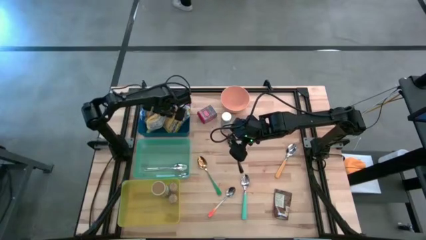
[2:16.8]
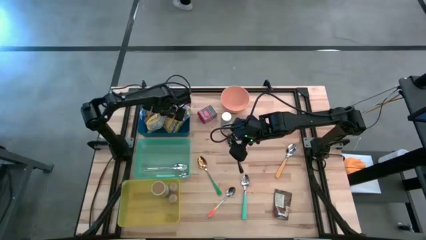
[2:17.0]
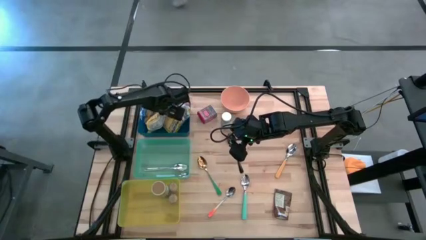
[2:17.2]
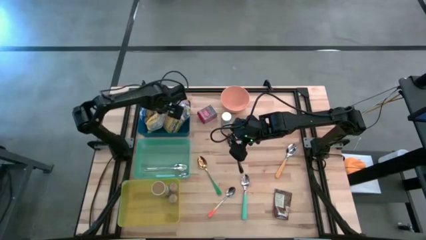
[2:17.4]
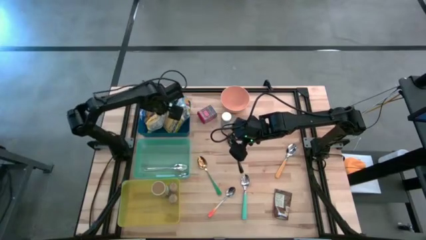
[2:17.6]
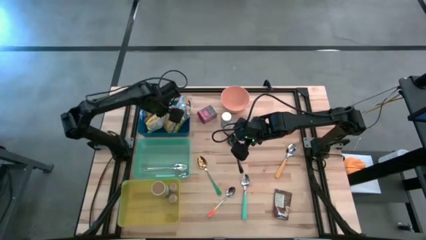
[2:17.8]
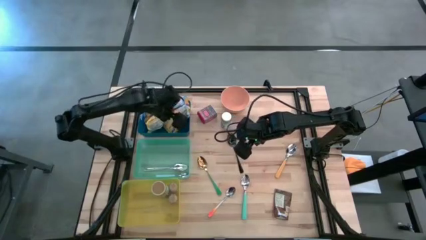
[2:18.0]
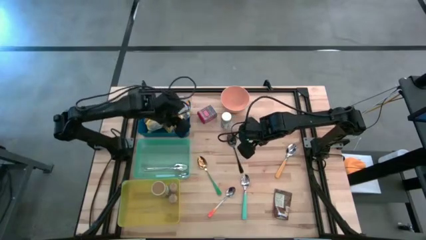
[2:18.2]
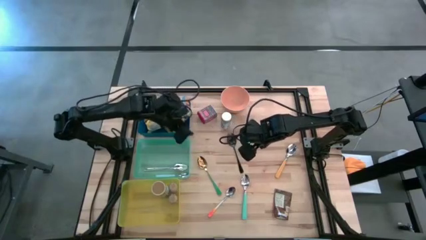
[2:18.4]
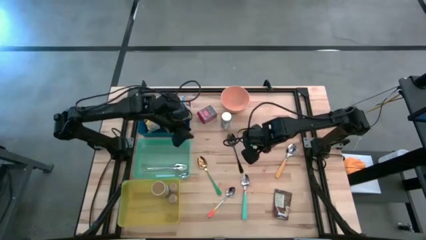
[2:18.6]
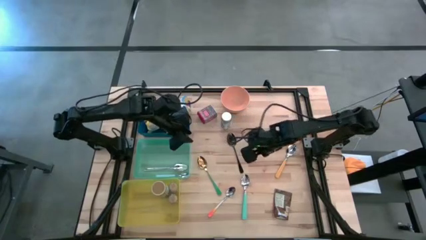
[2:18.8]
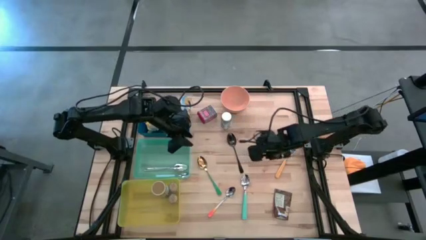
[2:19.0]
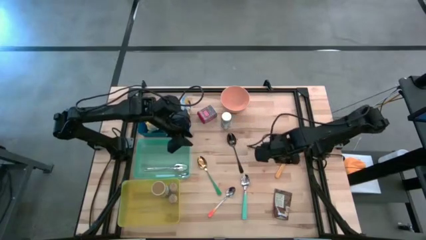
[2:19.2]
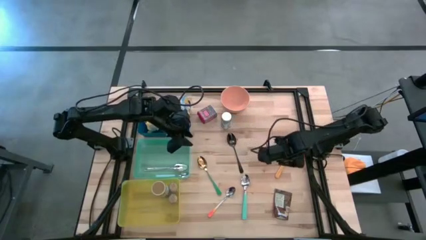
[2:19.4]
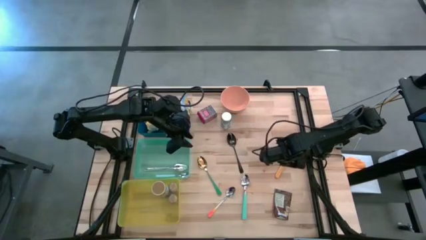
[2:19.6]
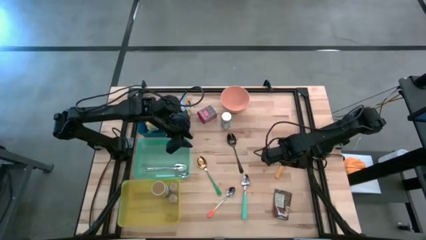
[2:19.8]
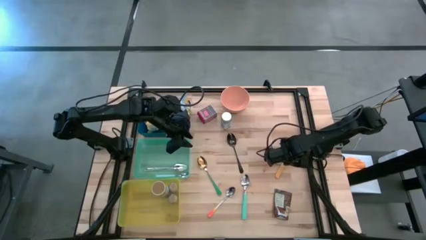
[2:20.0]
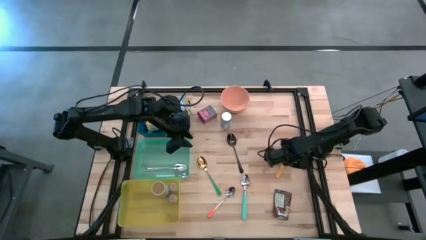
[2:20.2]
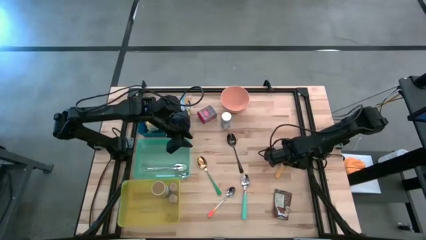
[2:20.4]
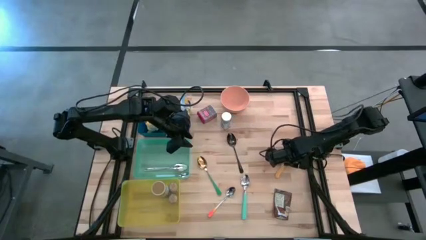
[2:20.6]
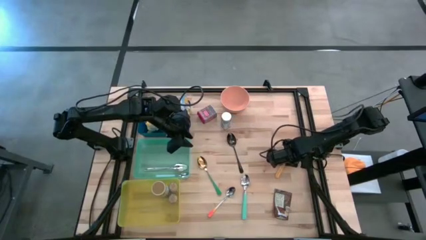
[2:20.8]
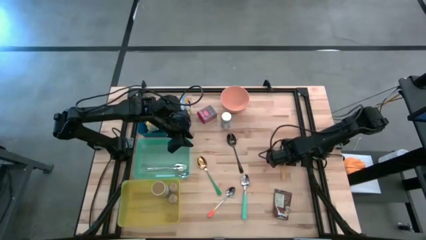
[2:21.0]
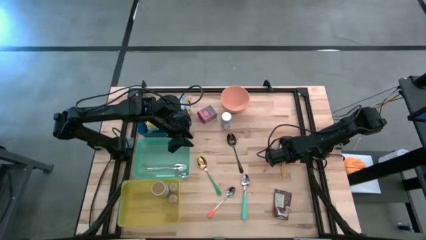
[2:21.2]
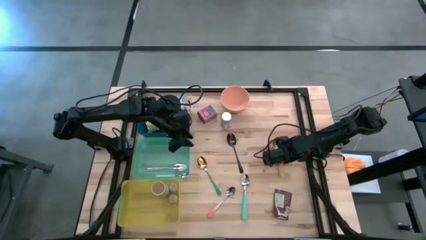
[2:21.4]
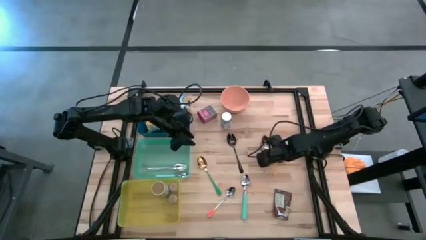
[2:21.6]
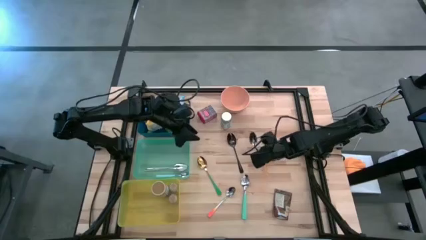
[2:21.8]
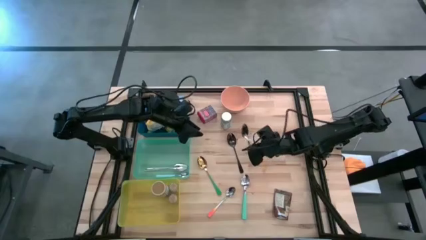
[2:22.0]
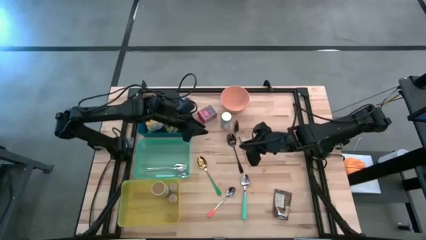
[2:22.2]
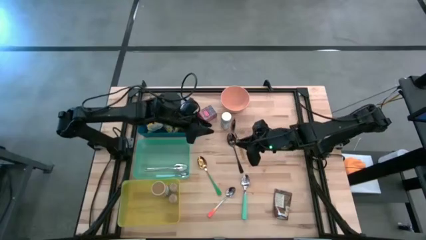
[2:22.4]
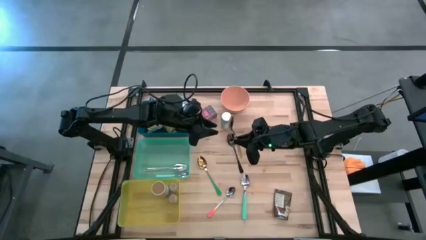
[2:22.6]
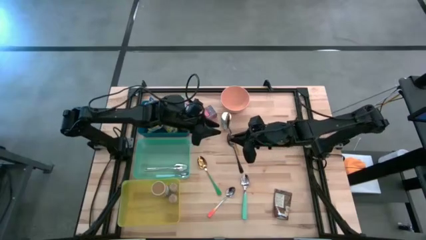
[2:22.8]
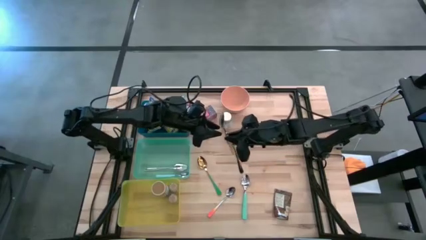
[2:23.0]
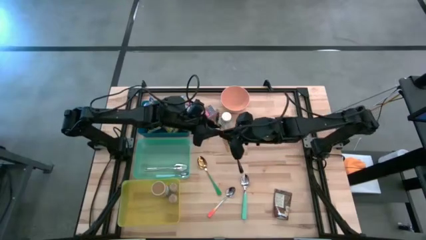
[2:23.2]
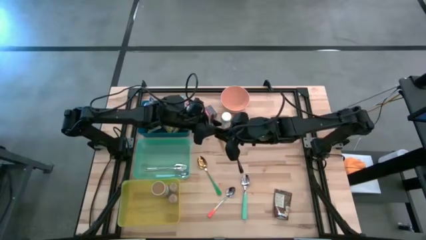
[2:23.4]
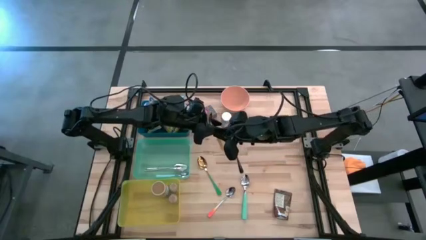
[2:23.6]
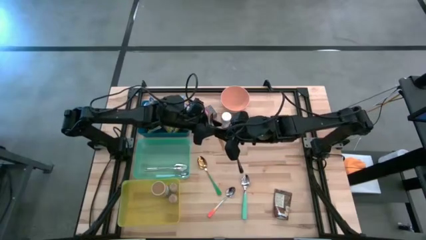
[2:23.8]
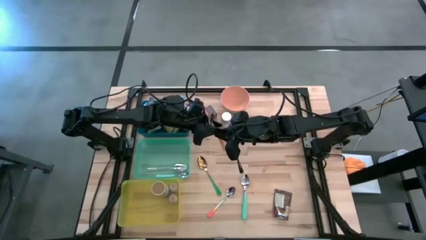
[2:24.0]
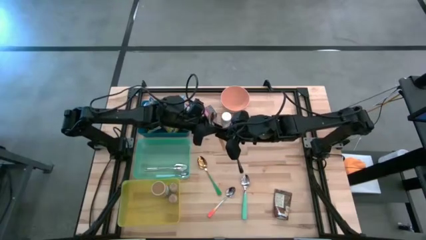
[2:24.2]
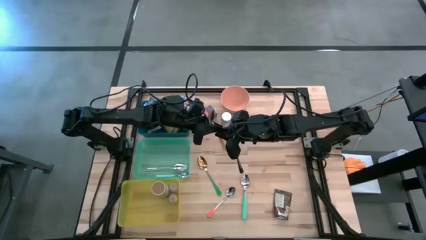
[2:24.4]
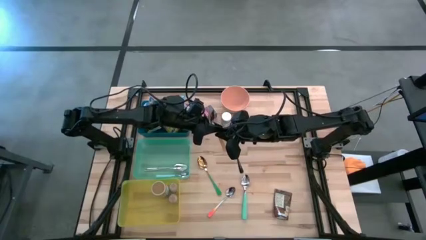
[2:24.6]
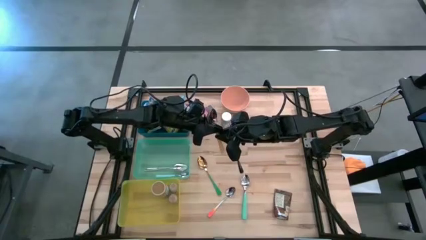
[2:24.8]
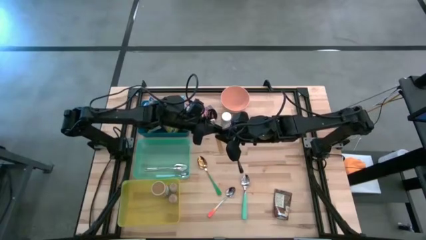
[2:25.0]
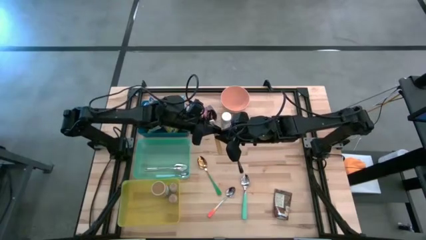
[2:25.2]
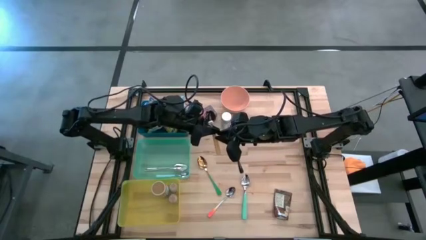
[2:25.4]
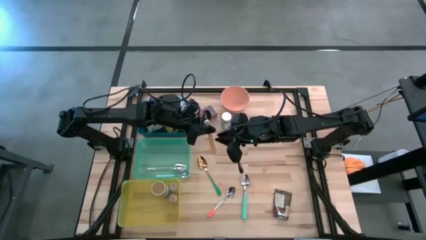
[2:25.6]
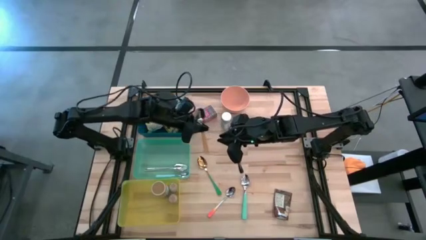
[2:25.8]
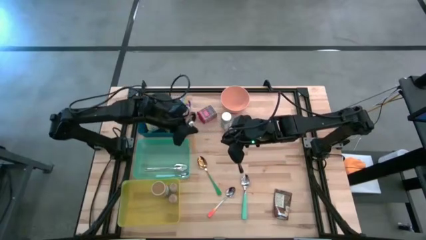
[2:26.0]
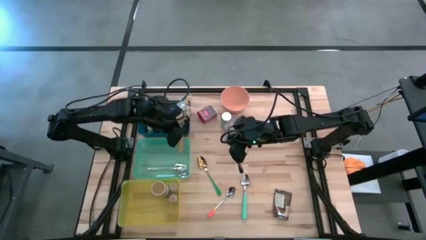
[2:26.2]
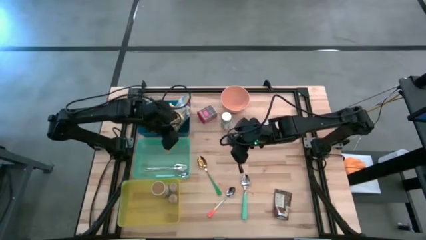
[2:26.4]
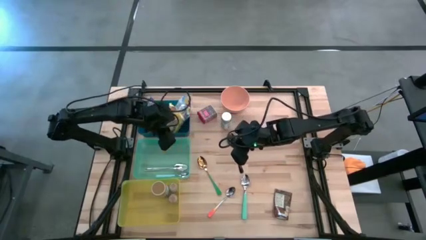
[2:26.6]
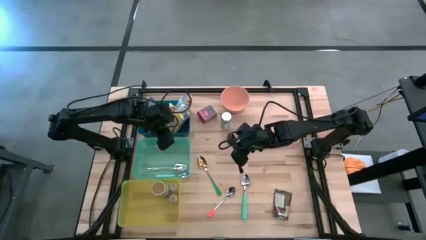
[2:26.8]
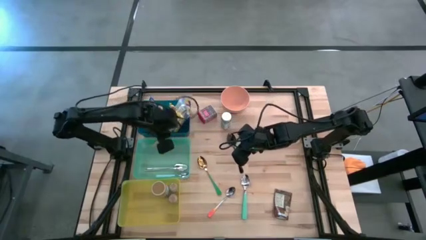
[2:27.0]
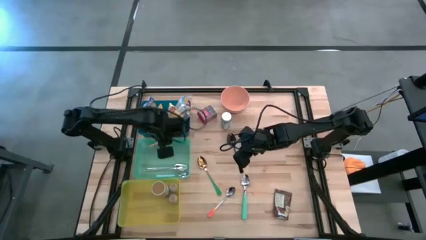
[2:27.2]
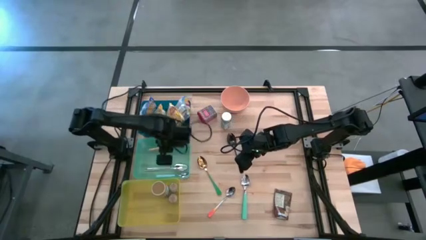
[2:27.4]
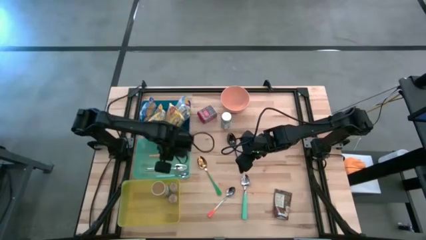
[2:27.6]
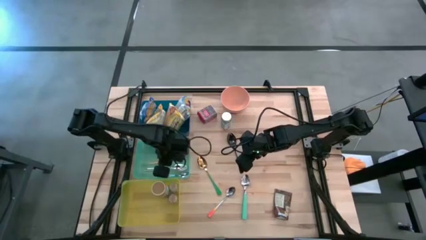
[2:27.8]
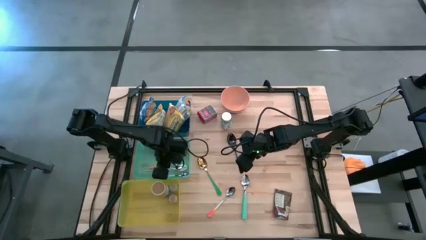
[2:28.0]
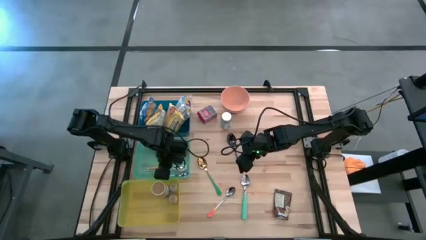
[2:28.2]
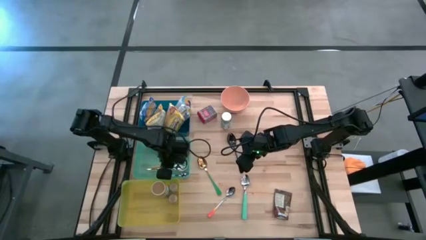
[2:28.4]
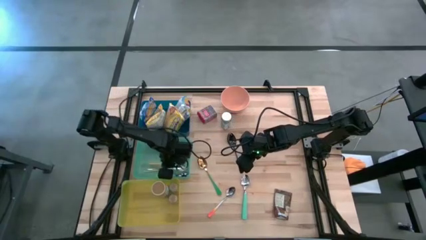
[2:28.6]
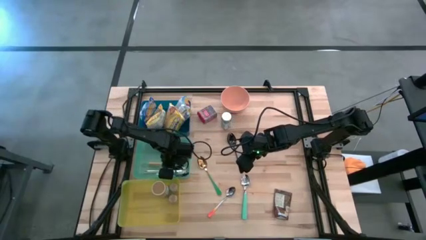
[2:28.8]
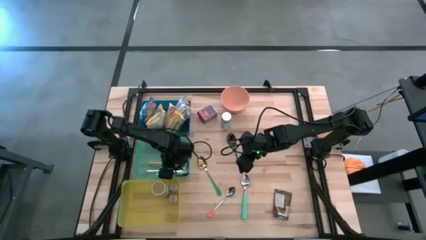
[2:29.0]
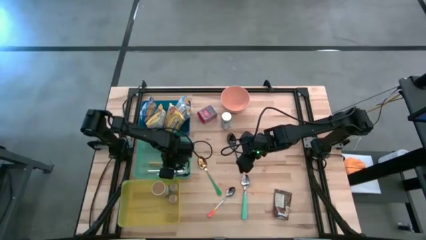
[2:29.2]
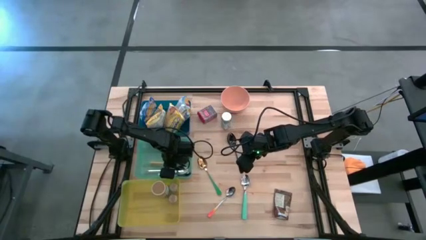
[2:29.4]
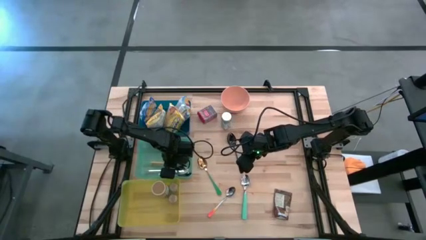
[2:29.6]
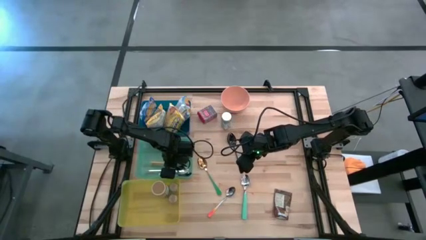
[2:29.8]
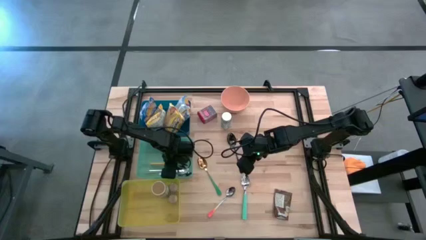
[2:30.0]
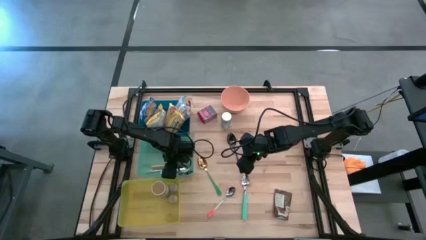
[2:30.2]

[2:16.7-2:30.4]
Put the yellow spoon into the light blue bin
